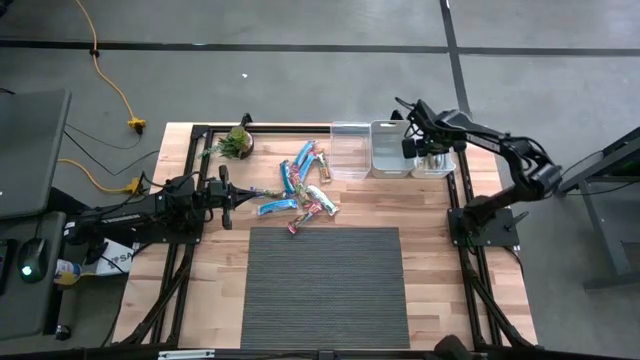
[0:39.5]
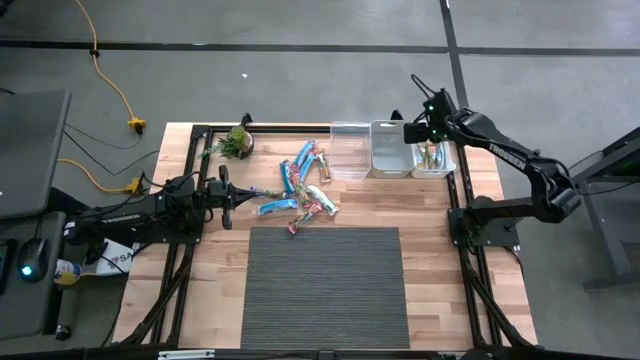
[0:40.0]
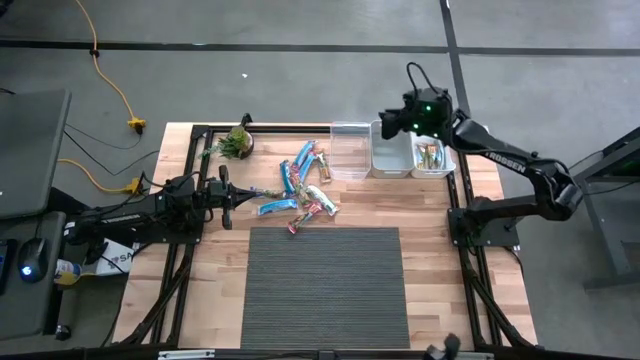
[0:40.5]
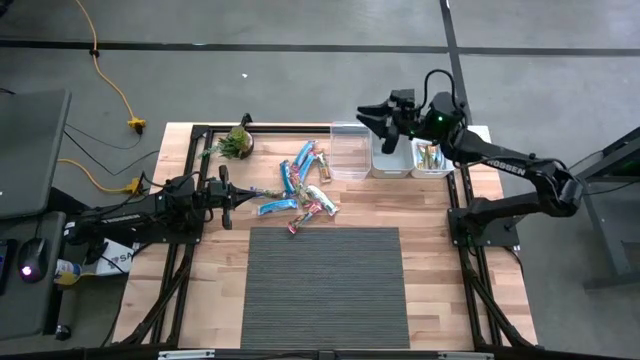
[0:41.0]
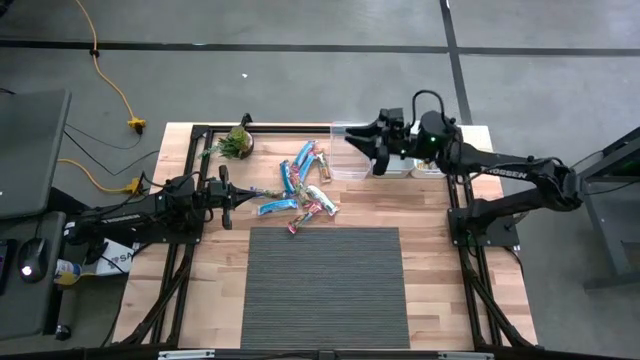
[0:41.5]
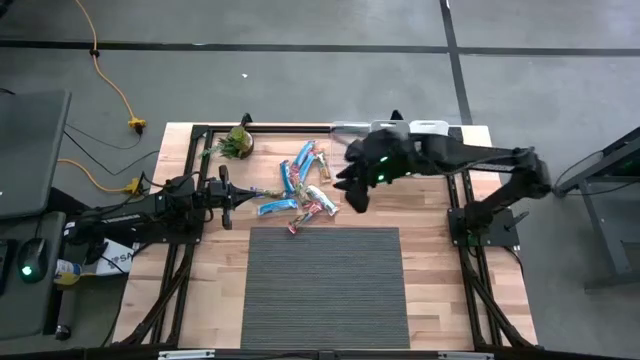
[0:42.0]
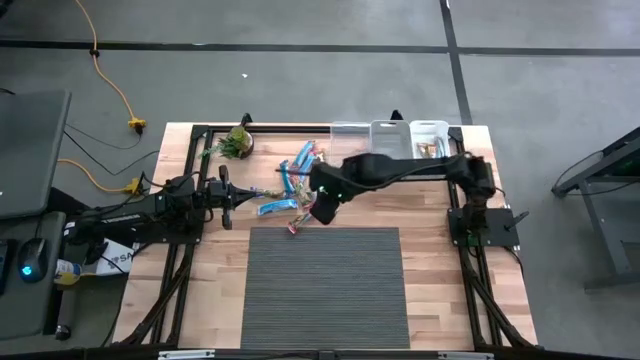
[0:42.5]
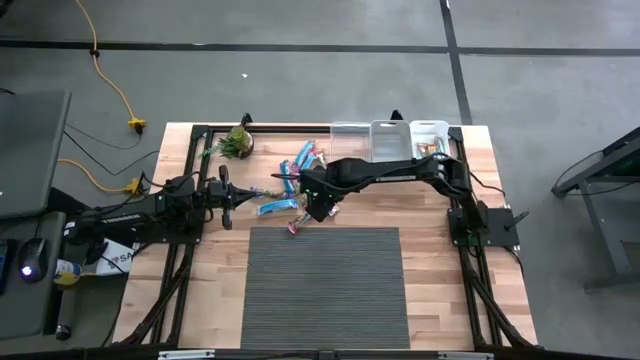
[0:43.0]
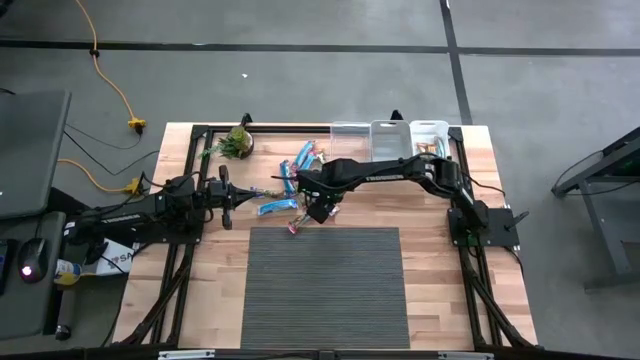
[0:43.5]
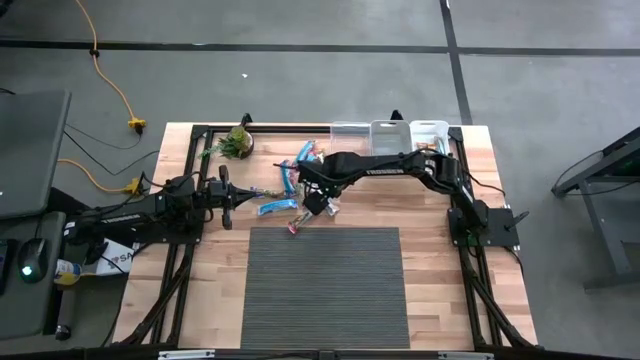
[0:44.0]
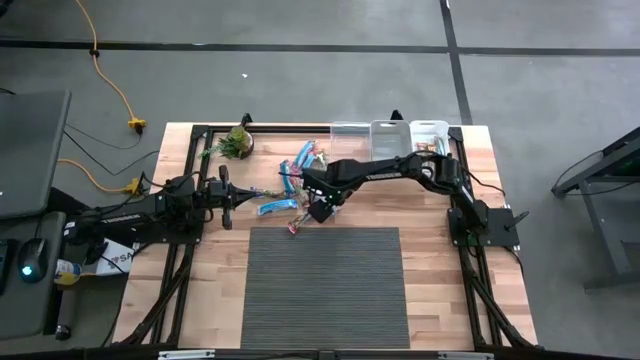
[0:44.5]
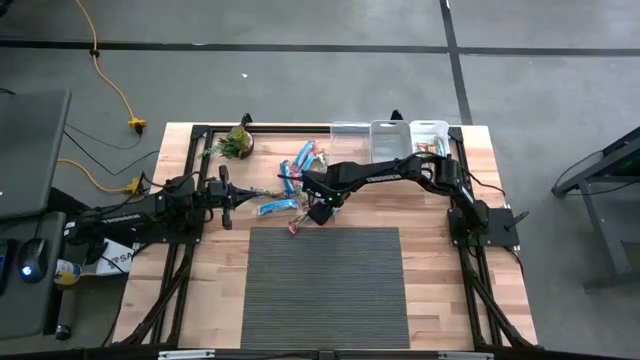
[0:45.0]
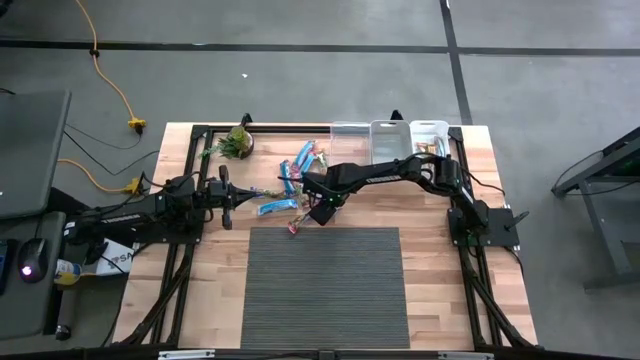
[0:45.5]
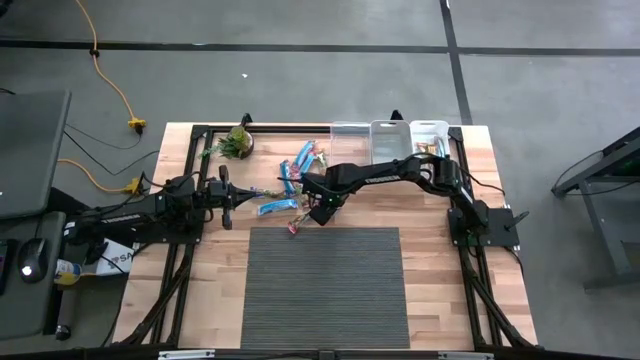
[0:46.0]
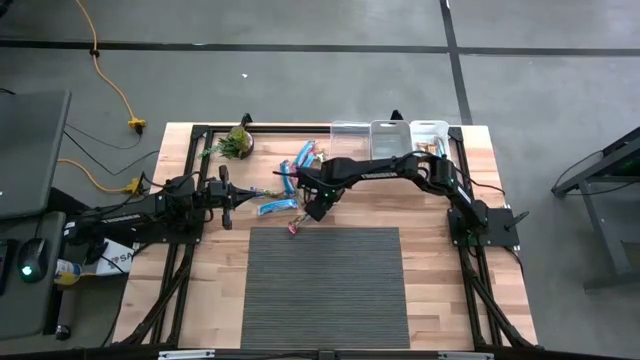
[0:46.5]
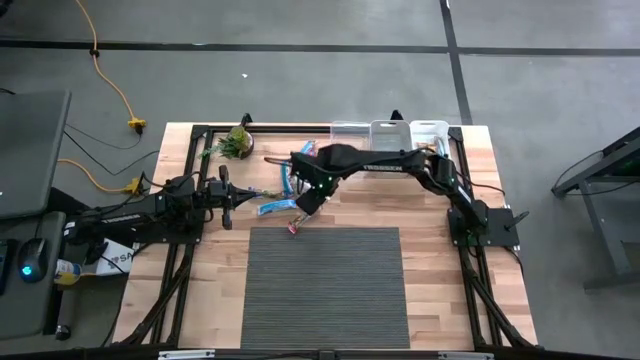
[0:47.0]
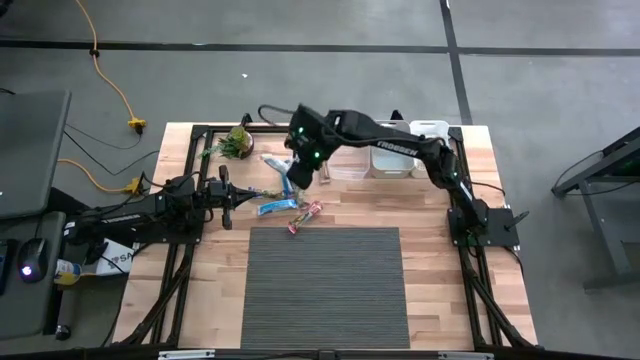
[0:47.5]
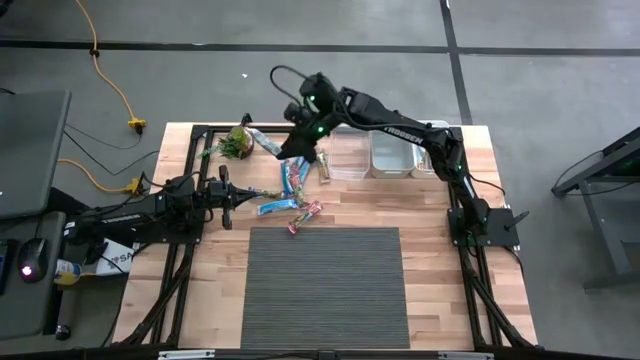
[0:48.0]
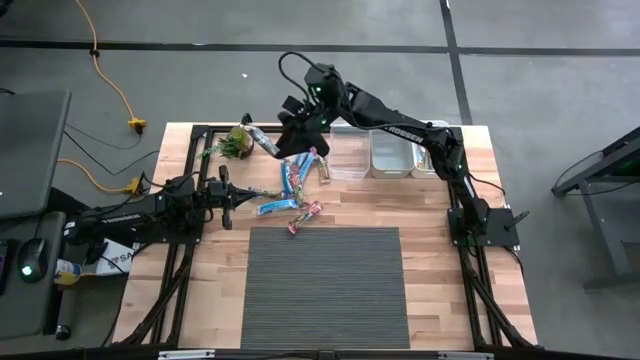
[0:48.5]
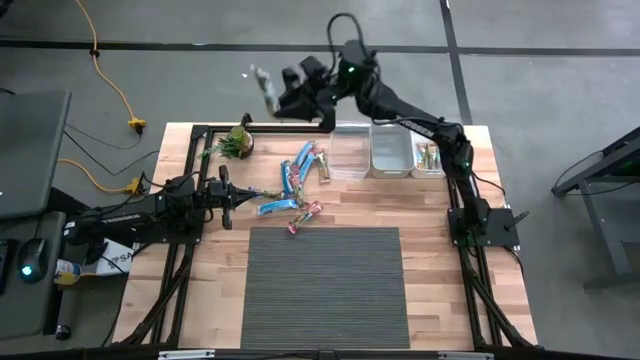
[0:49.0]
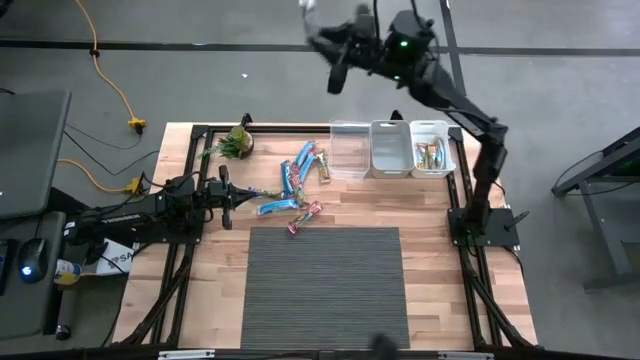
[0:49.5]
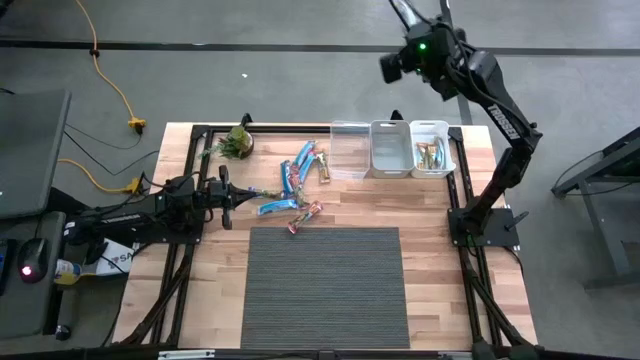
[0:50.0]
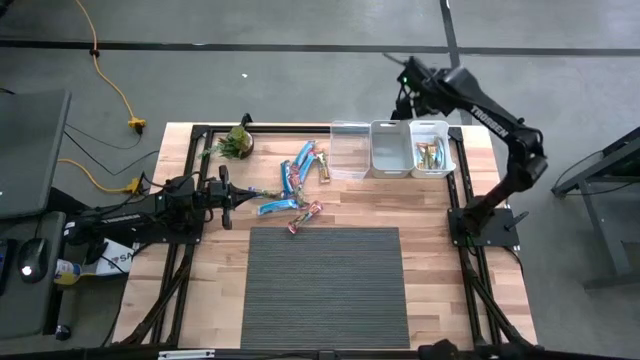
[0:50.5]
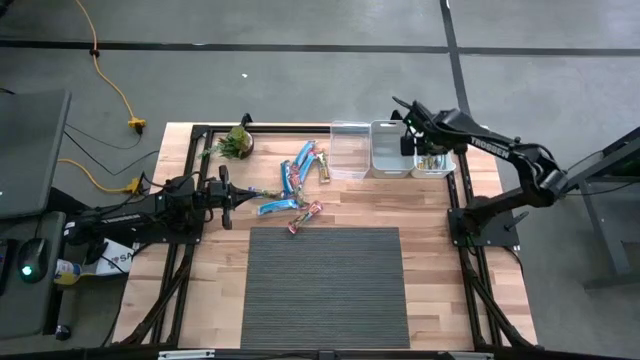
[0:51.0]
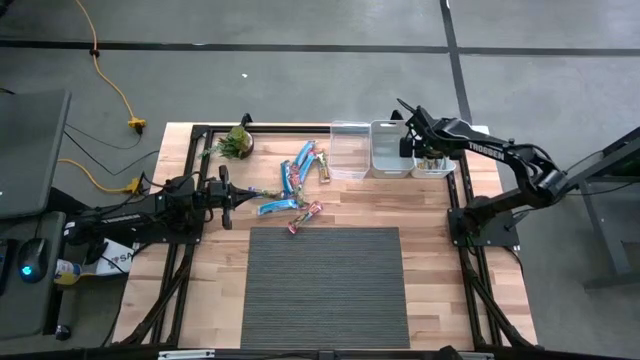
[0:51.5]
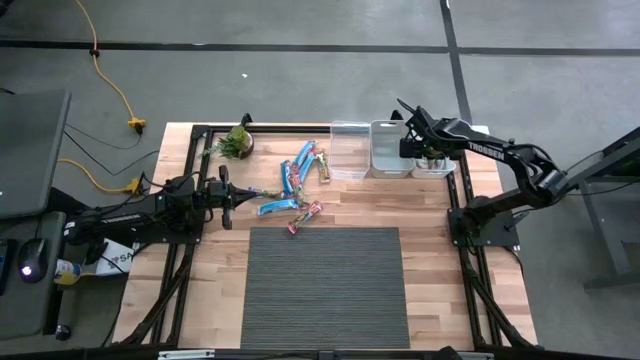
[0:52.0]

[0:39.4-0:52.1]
Task: Pick and place Granola Bars by type
Put the yellow granola bar into the white bin

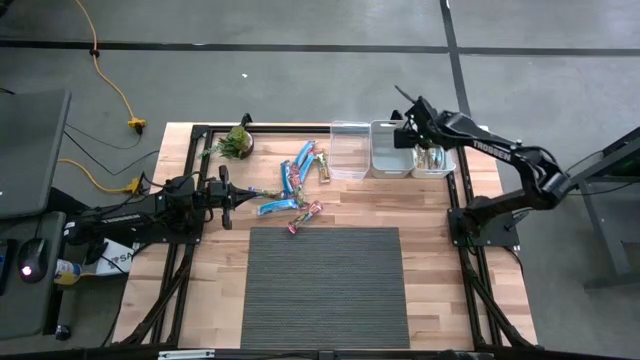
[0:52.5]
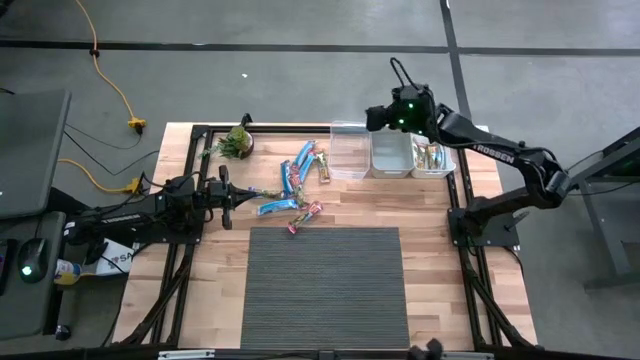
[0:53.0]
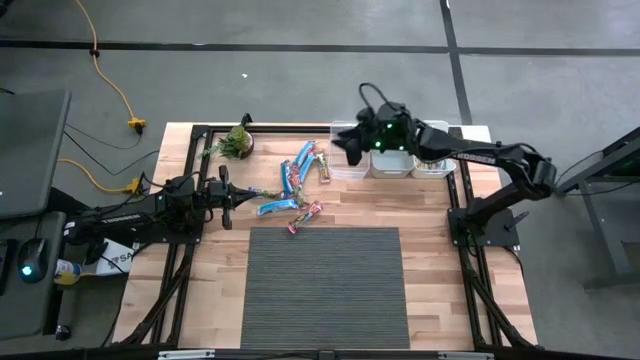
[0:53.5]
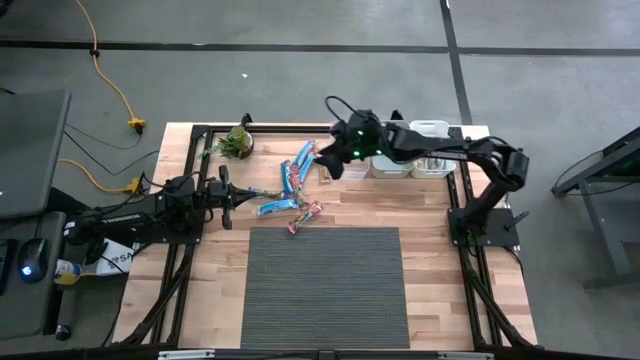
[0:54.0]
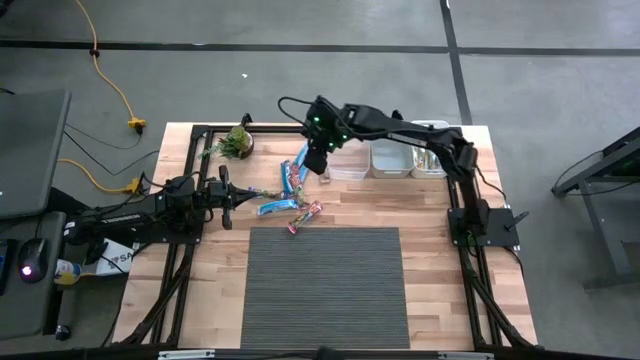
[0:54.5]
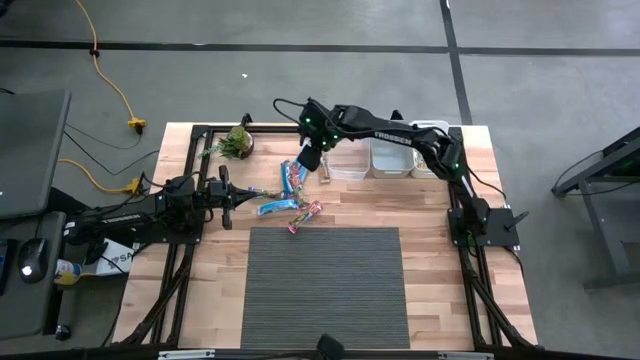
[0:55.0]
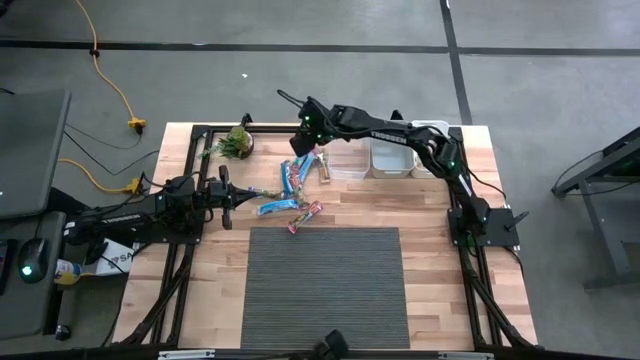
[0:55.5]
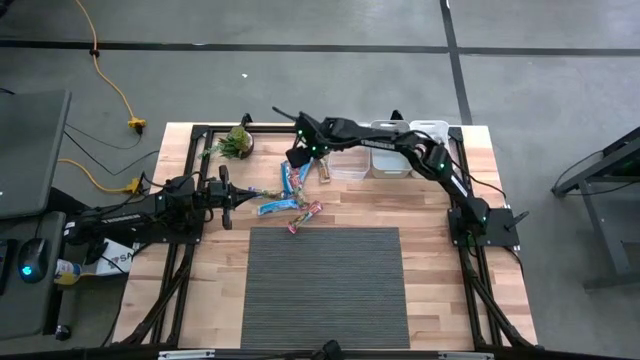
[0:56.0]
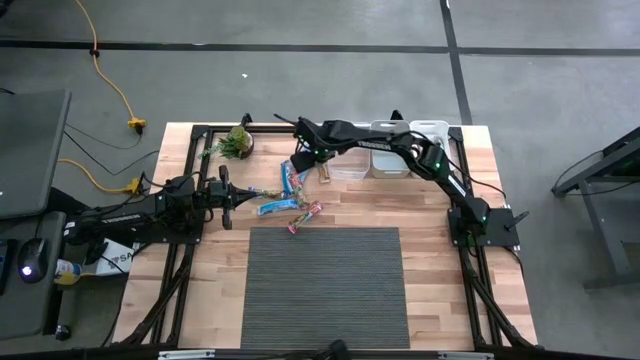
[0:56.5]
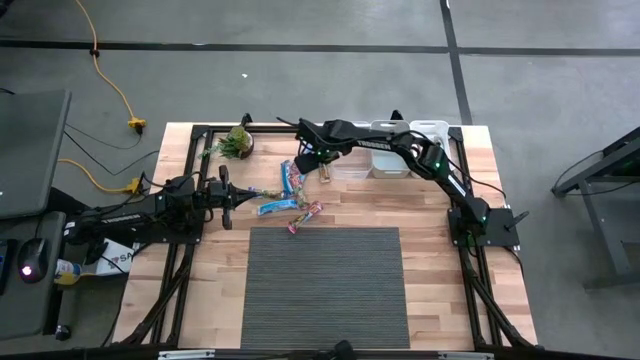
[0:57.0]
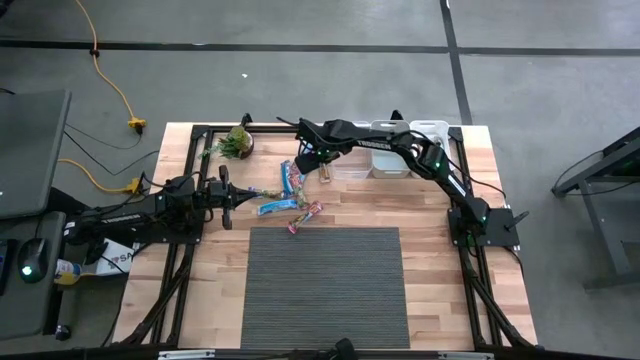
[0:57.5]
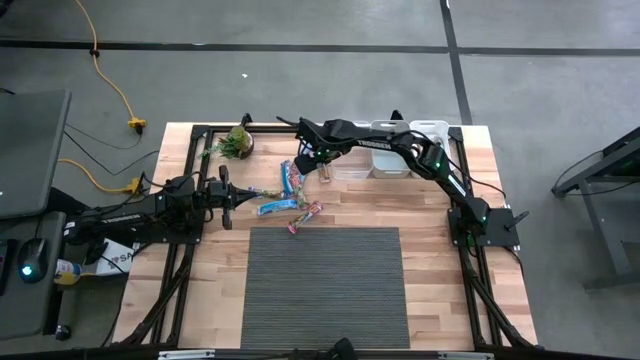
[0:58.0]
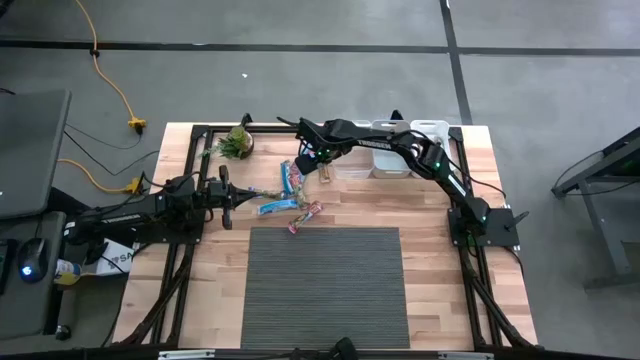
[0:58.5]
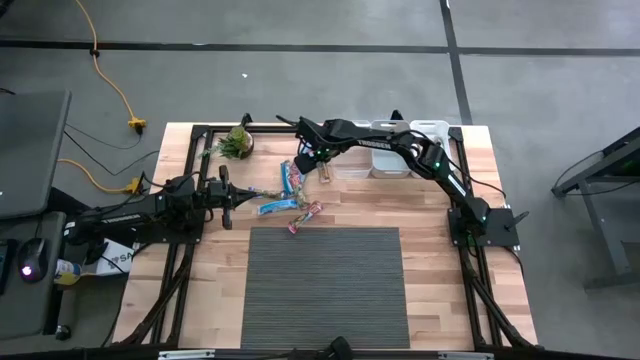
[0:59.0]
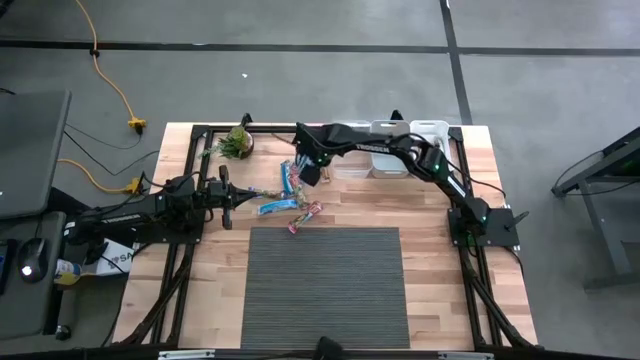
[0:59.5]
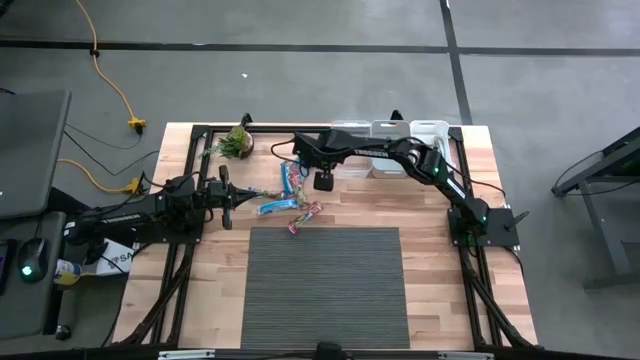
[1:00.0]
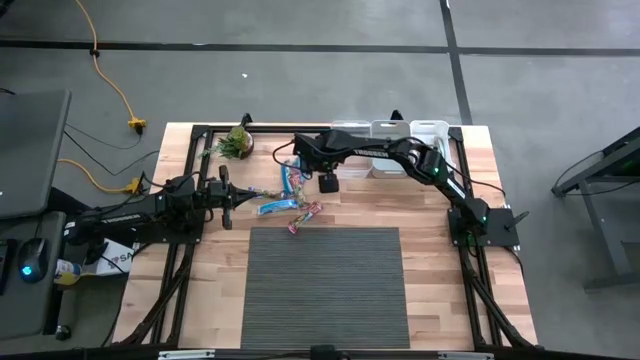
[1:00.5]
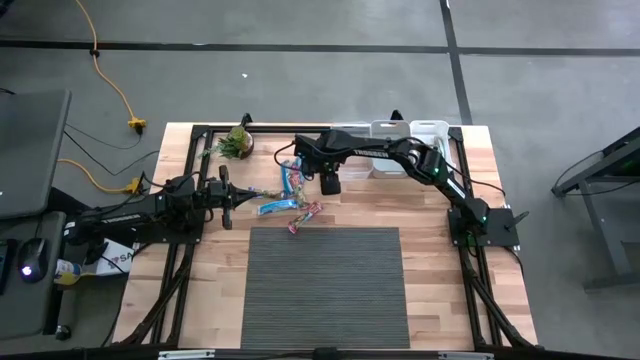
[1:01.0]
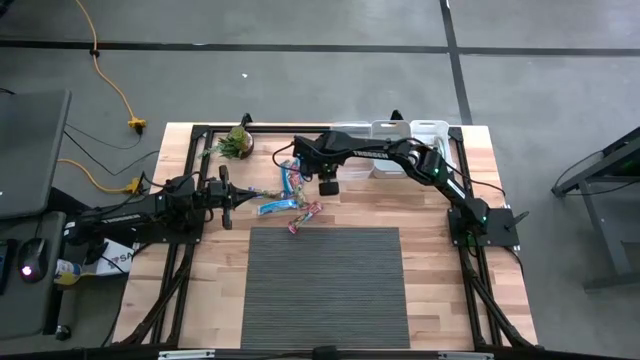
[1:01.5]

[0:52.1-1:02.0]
Put the yellow granola bar into the white bin
